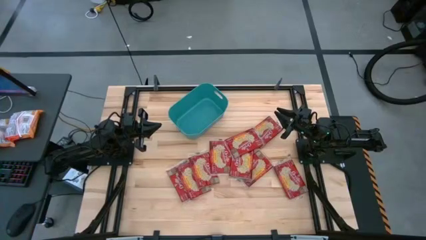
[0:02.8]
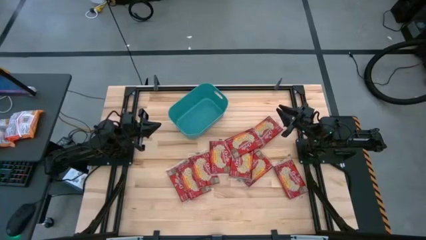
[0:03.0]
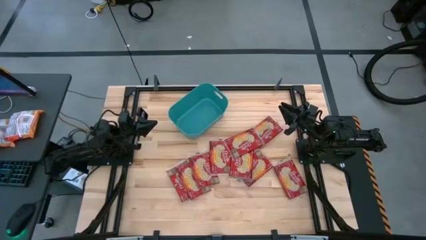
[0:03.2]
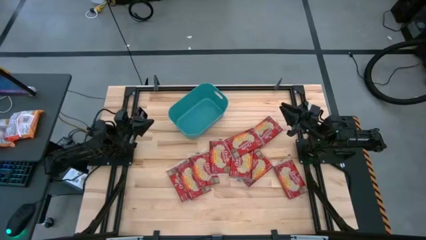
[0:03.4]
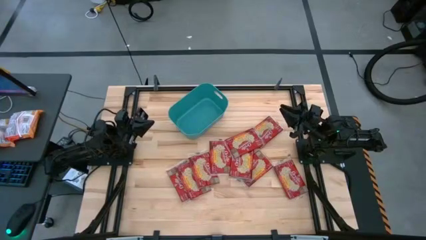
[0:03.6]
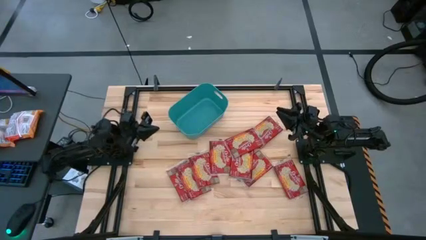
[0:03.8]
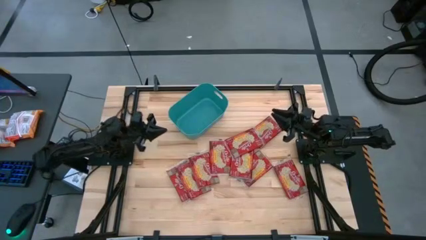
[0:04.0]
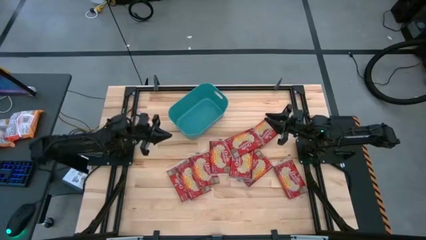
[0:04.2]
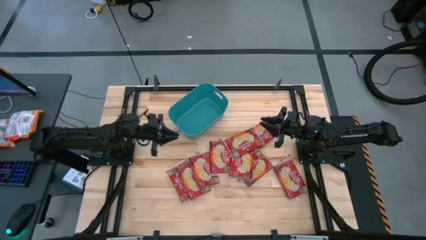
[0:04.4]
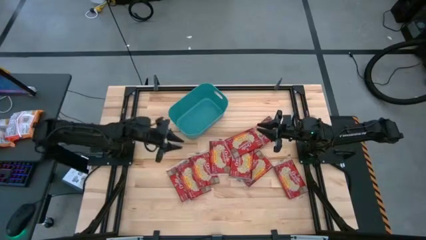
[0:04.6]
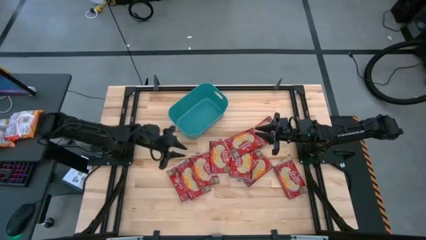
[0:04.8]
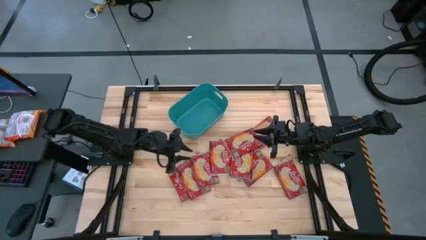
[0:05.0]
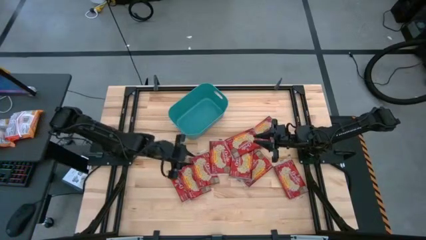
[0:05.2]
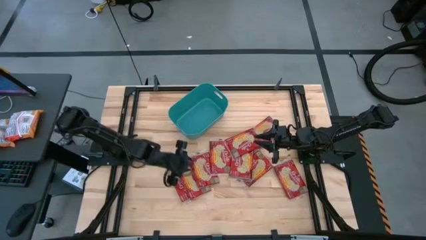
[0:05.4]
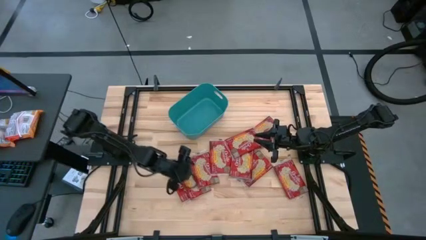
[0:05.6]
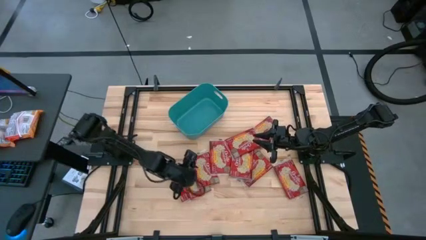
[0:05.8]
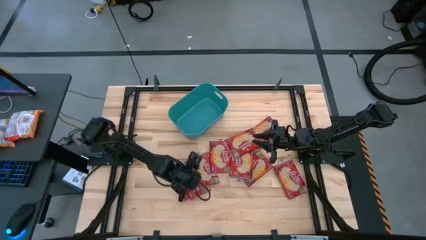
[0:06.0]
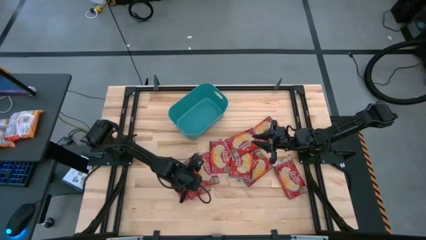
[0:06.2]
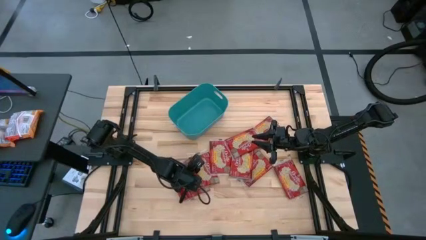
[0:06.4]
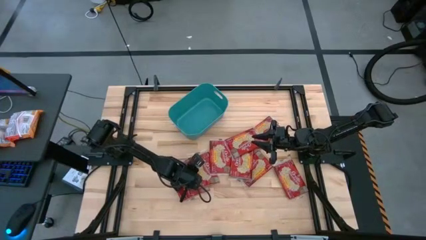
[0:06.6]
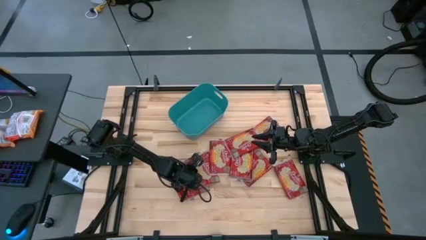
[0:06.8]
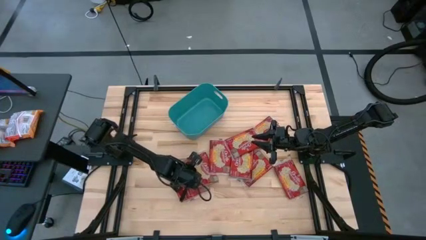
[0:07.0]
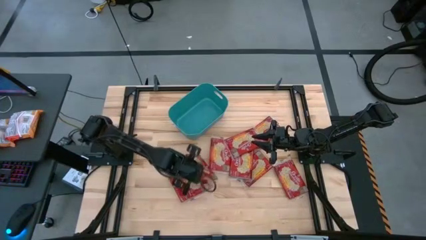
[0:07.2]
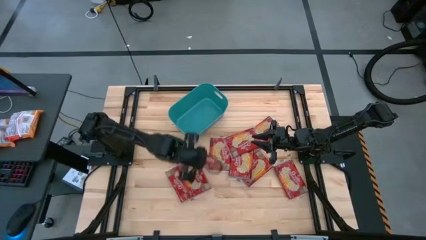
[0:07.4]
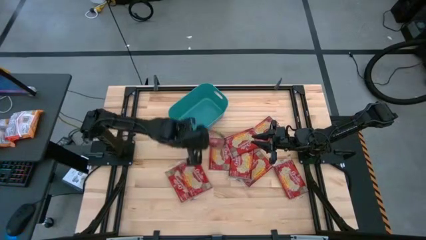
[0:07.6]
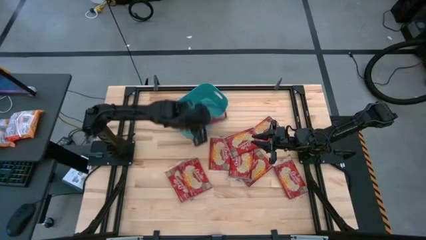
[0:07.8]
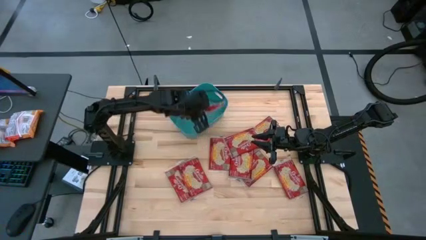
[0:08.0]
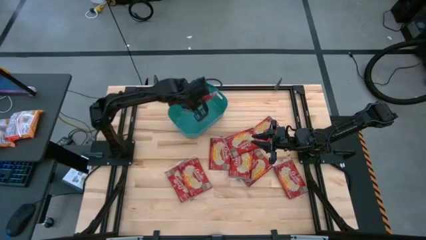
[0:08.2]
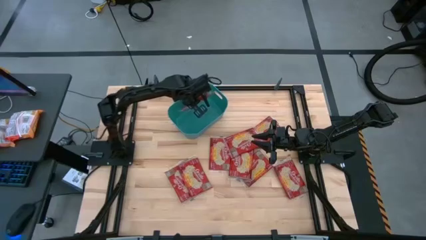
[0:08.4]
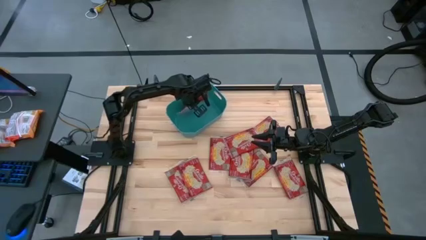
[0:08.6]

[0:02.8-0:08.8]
Task: Sort popcorn bags into baskets
Put the red popcorn bag into the green bin

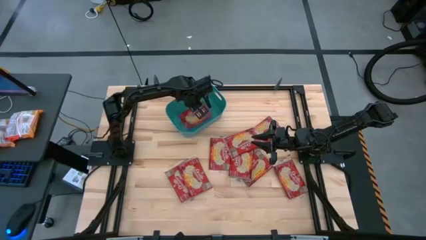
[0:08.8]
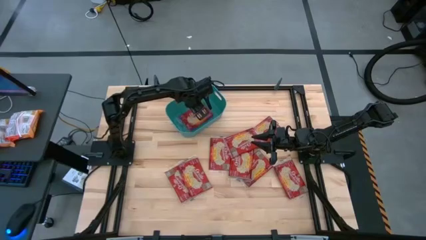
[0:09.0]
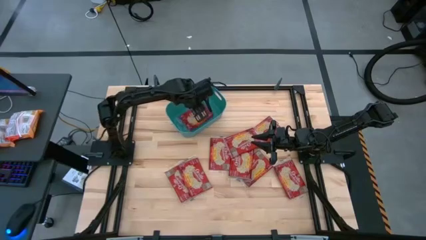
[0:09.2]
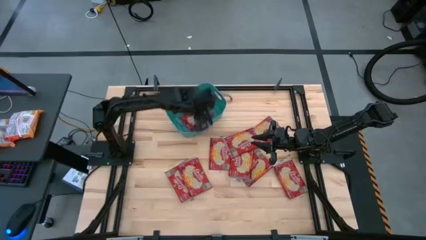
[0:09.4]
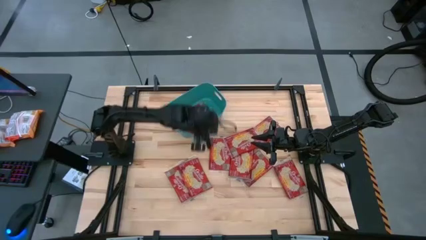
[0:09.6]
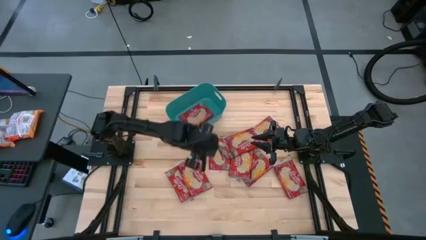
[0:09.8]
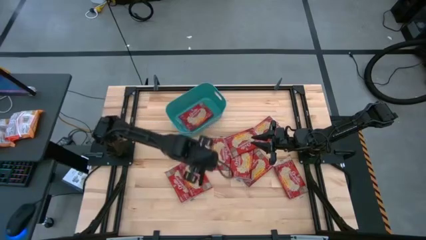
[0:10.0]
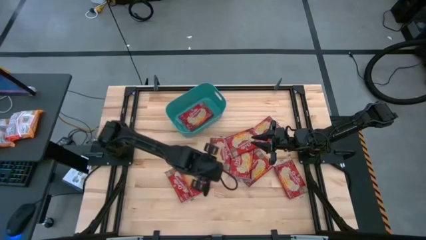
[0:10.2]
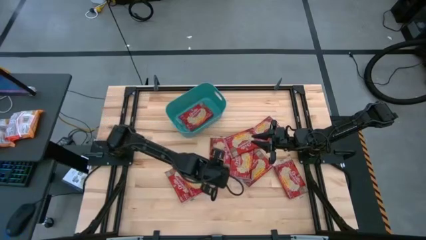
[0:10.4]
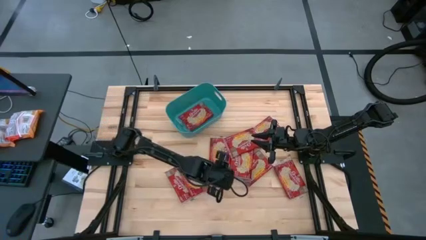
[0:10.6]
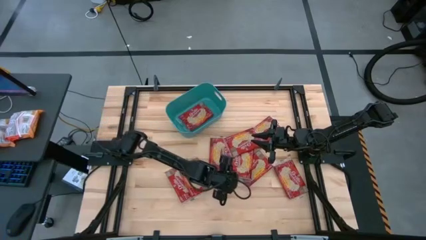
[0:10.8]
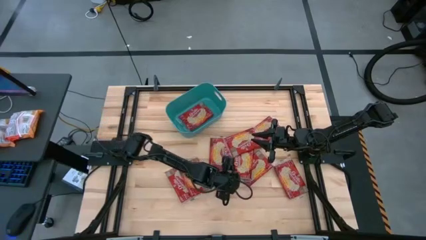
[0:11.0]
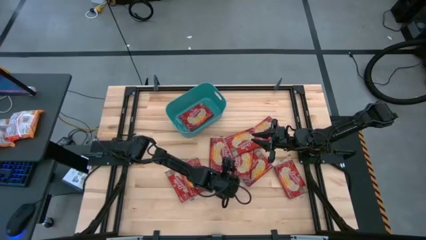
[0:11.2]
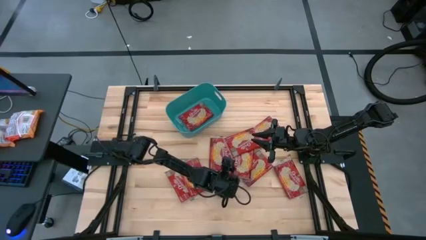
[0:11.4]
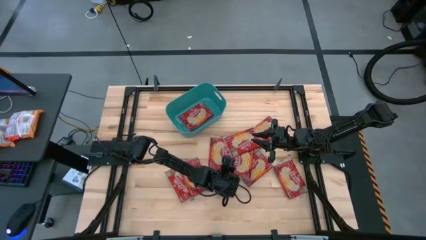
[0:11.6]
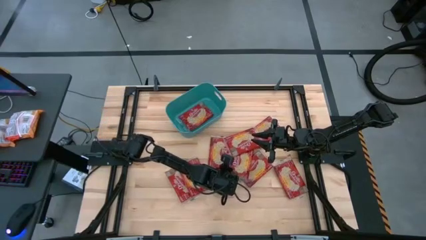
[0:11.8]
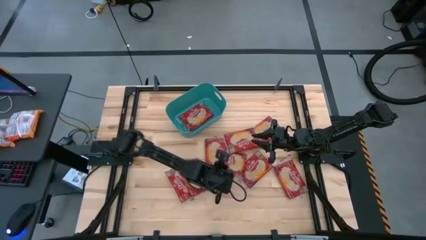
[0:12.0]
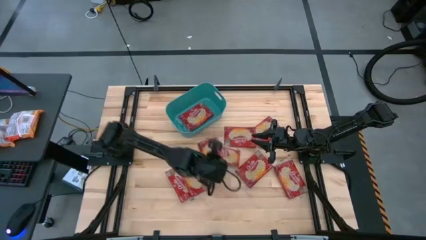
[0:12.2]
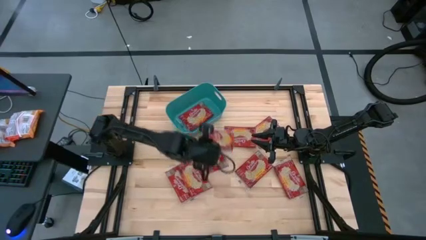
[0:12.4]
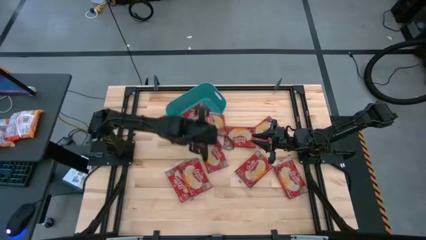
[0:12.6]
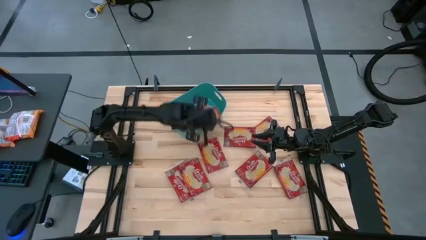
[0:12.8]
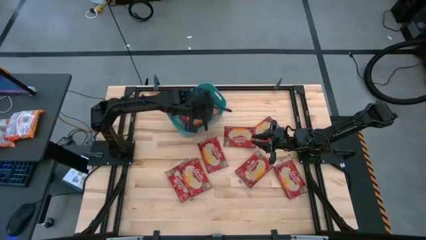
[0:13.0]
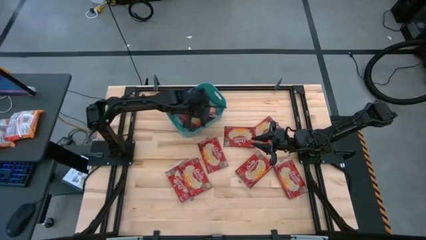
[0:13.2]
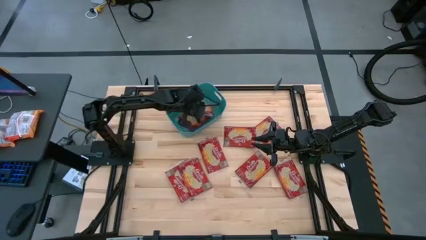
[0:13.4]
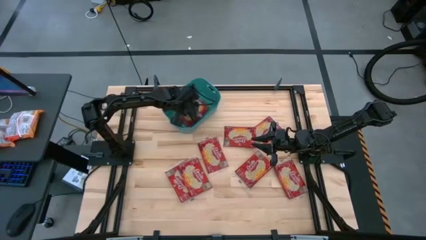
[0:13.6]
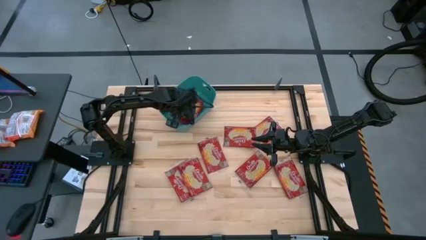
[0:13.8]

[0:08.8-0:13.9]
Put the red popcorn bag into the green bin

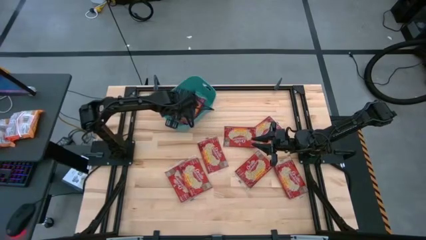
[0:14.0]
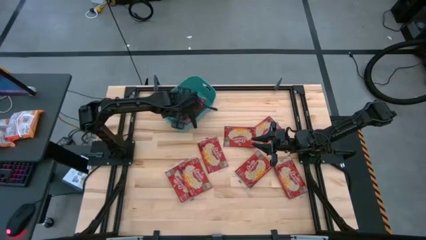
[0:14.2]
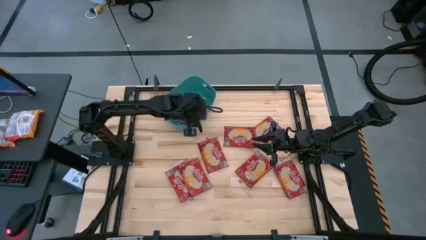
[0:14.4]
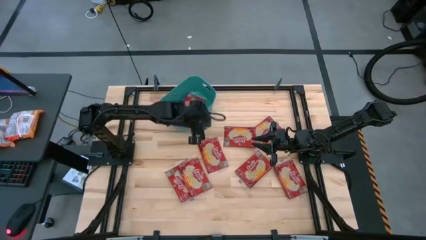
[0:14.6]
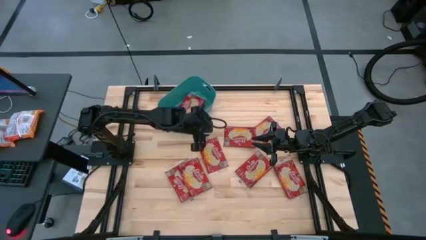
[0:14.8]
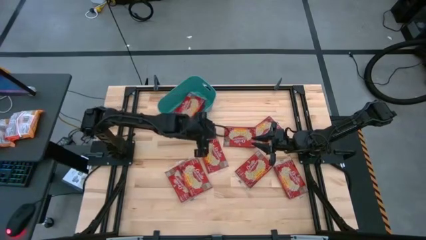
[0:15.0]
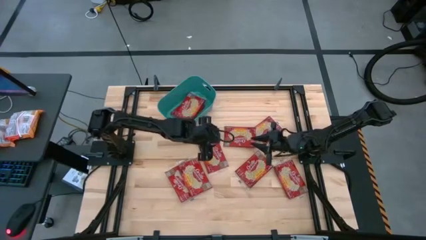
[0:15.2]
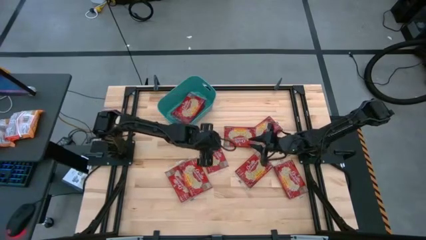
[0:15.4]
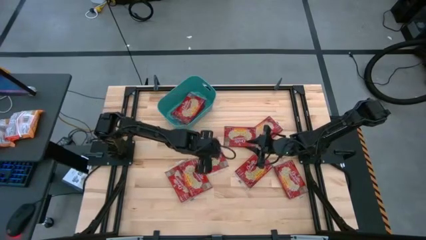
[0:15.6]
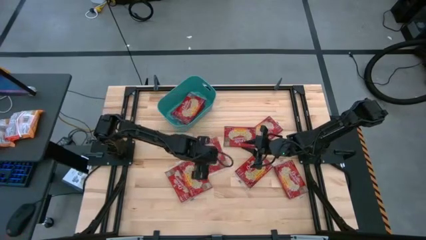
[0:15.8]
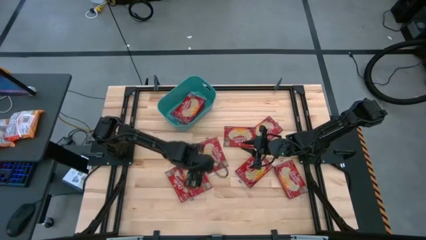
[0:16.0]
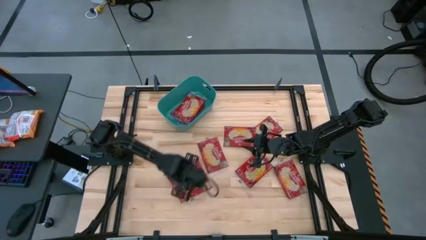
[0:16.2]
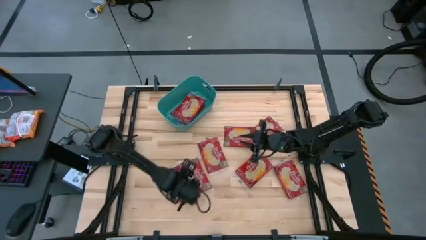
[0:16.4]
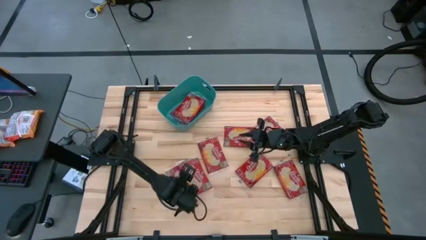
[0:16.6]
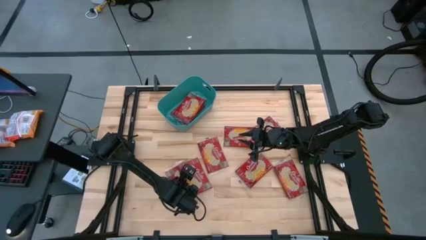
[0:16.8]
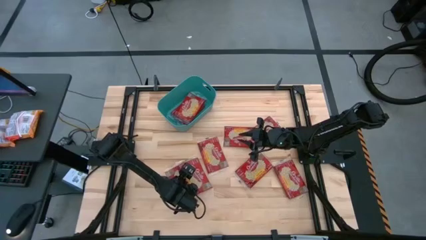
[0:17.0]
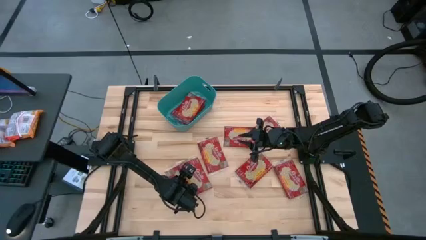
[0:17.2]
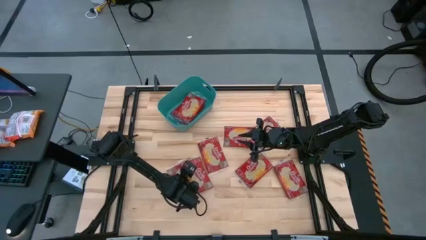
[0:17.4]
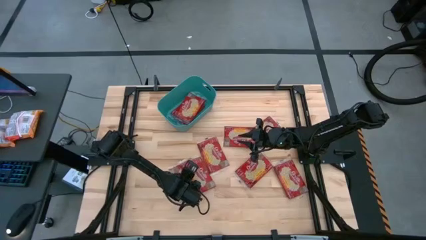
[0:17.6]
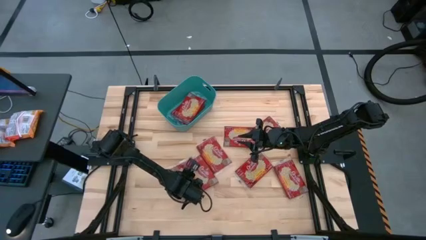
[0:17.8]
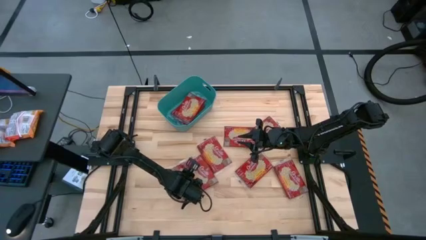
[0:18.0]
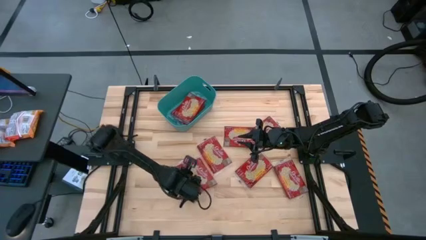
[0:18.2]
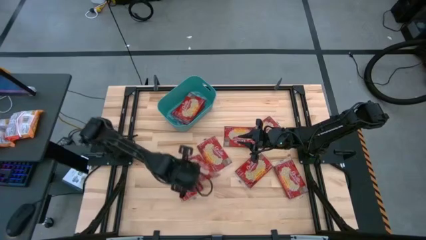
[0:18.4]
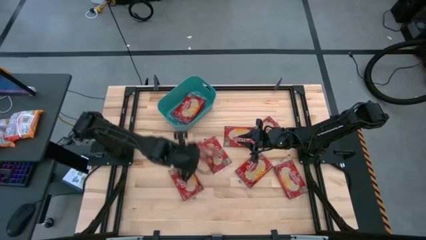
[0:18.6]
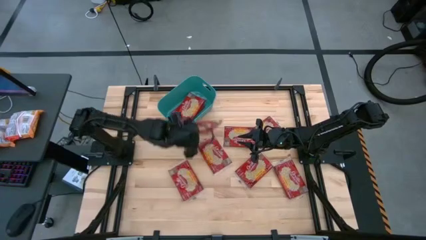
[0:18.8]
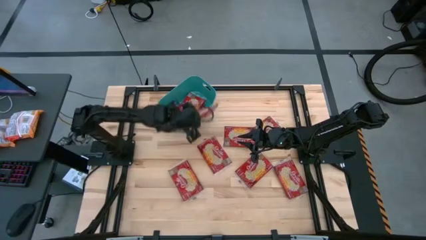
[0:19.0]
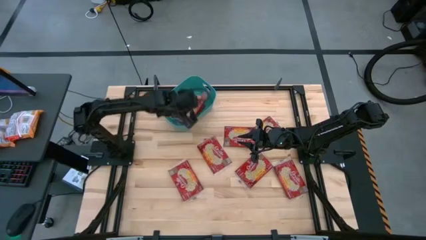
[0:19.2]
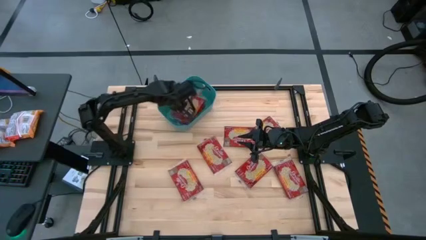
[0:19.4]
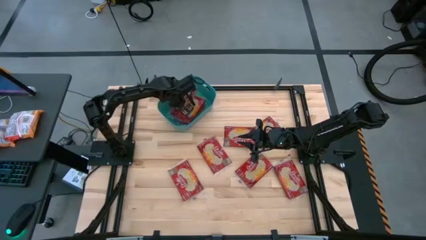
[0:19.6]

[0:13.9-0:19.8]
Put the red popcorn bag into the green bin
